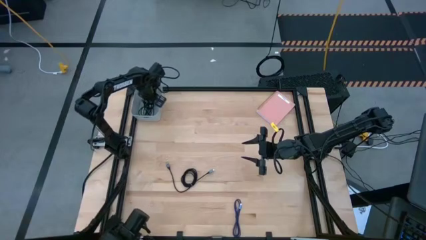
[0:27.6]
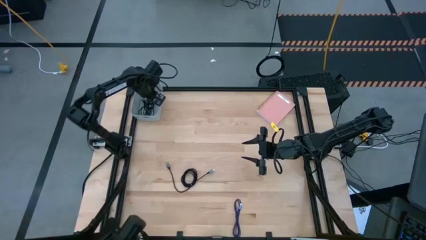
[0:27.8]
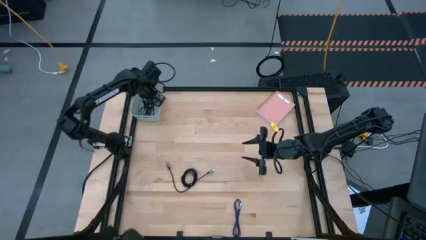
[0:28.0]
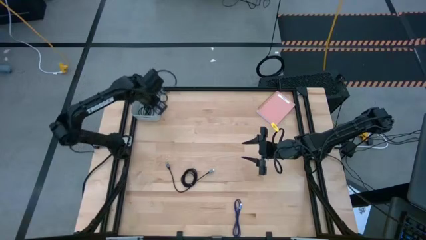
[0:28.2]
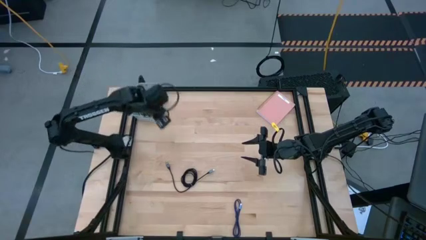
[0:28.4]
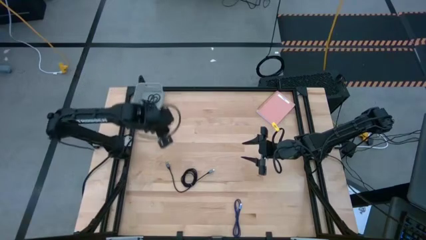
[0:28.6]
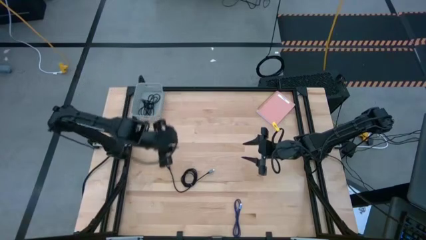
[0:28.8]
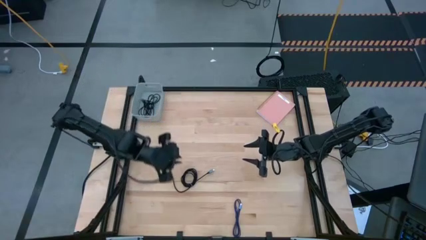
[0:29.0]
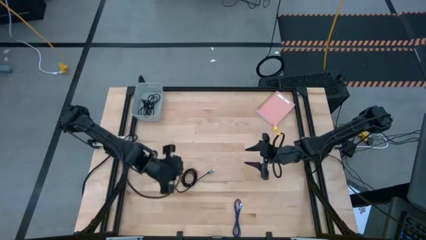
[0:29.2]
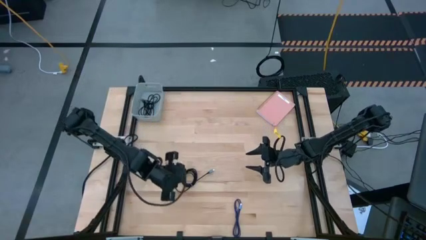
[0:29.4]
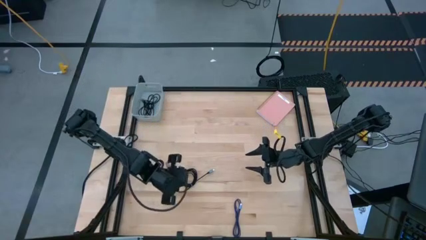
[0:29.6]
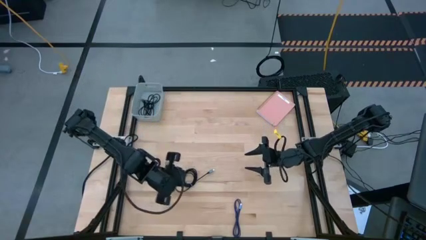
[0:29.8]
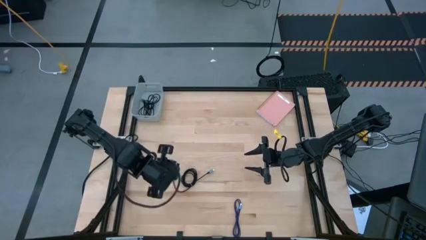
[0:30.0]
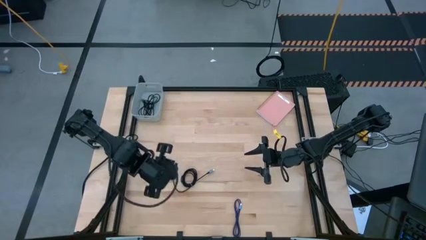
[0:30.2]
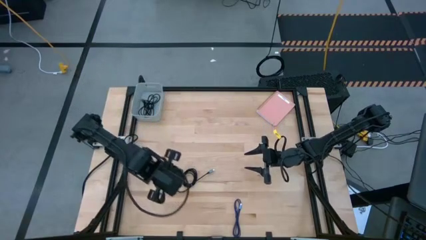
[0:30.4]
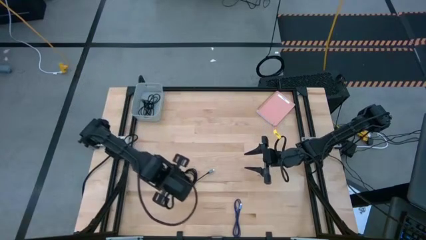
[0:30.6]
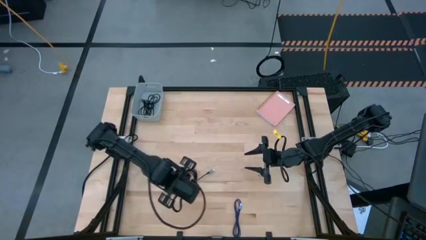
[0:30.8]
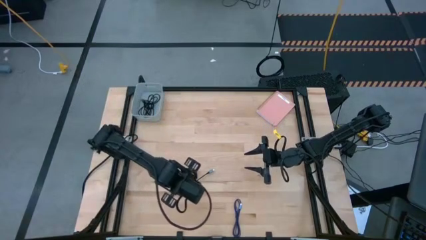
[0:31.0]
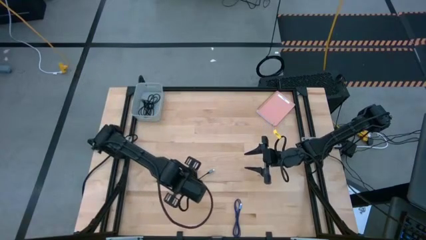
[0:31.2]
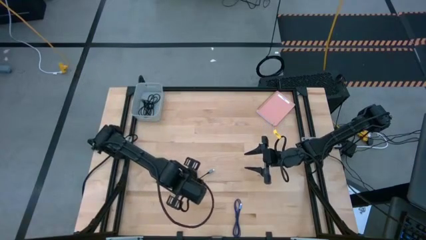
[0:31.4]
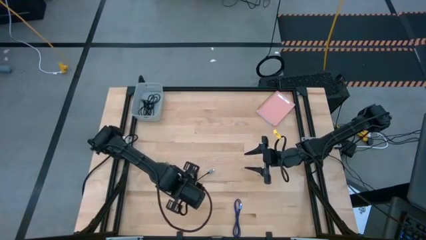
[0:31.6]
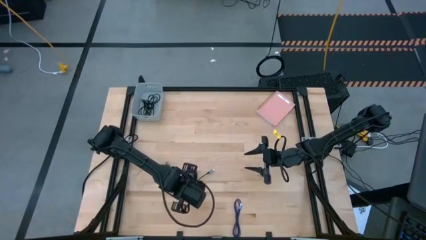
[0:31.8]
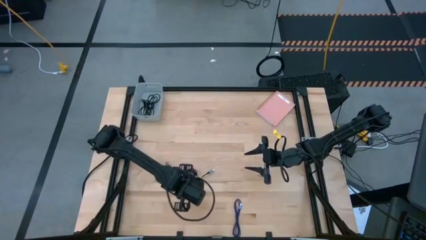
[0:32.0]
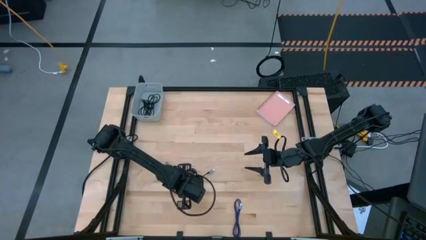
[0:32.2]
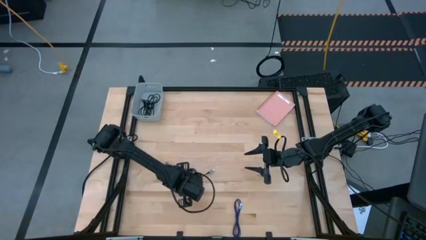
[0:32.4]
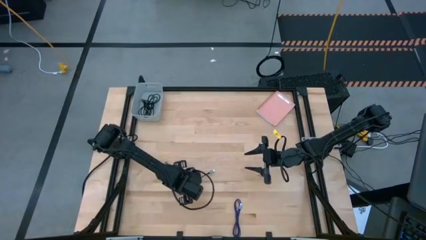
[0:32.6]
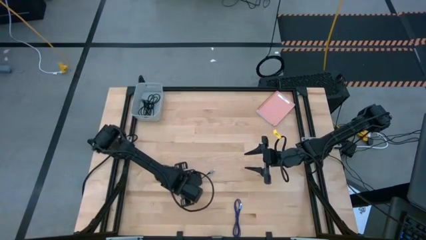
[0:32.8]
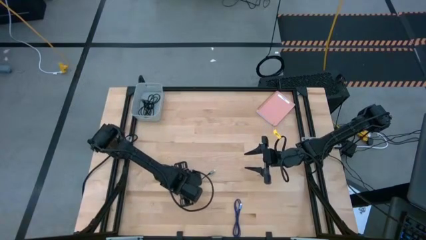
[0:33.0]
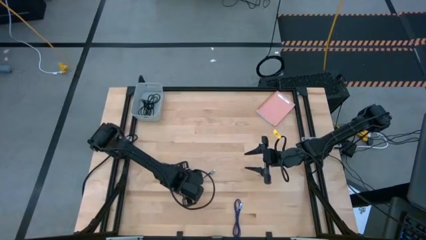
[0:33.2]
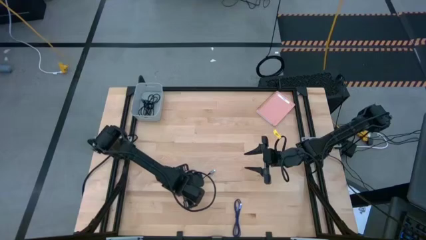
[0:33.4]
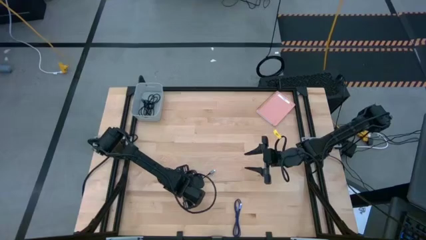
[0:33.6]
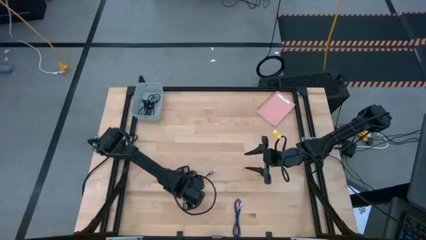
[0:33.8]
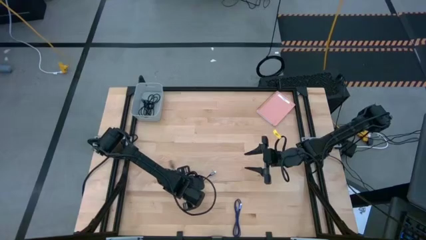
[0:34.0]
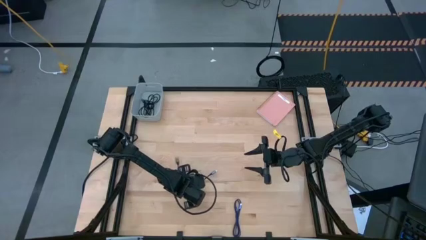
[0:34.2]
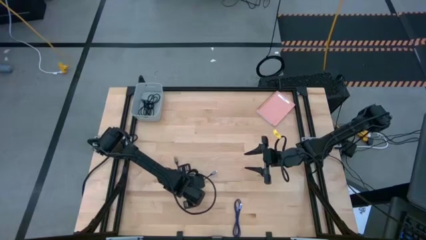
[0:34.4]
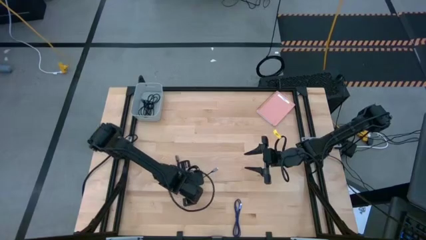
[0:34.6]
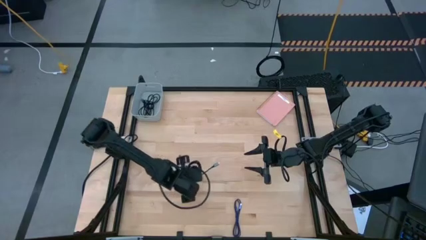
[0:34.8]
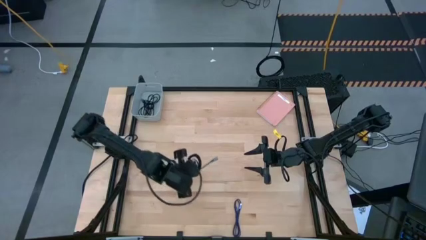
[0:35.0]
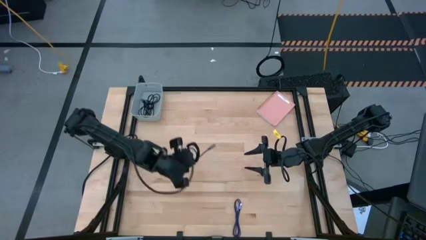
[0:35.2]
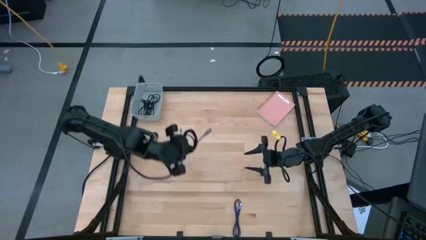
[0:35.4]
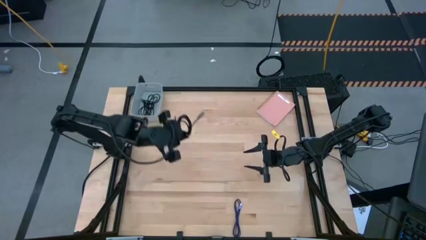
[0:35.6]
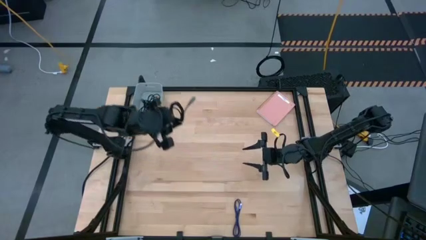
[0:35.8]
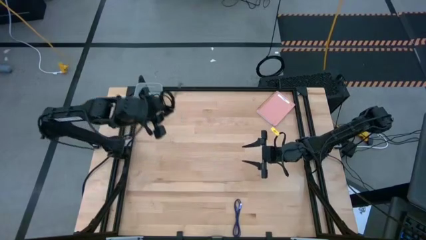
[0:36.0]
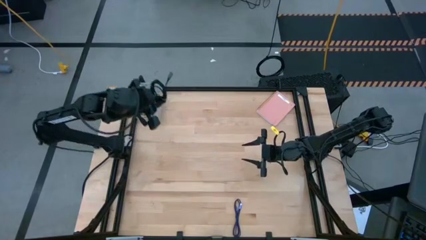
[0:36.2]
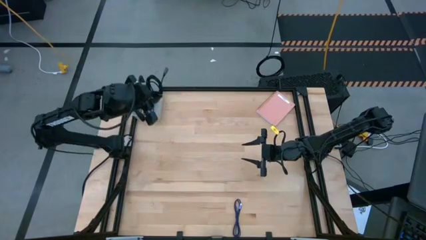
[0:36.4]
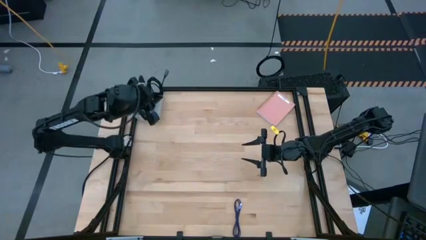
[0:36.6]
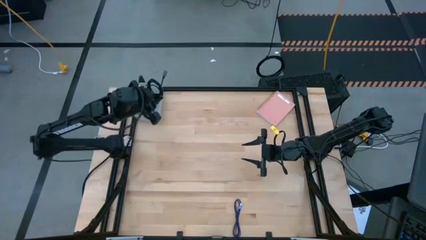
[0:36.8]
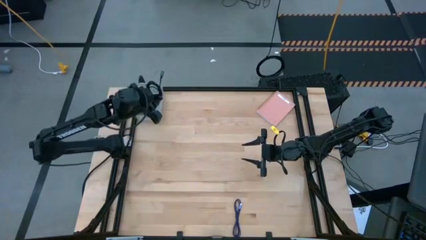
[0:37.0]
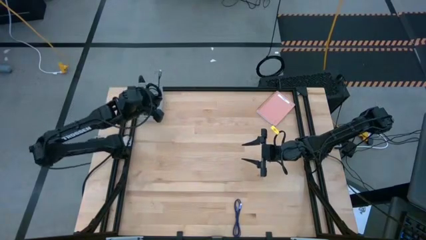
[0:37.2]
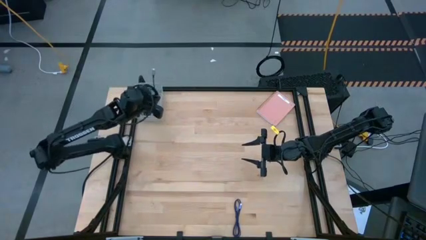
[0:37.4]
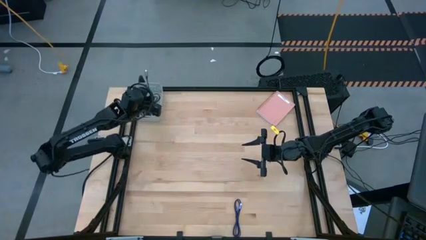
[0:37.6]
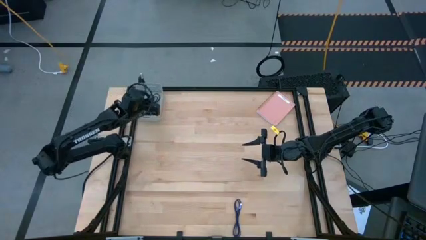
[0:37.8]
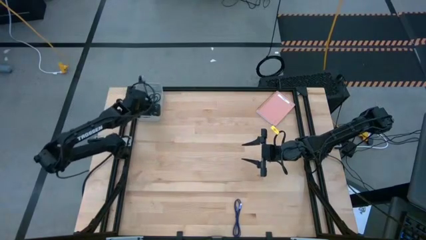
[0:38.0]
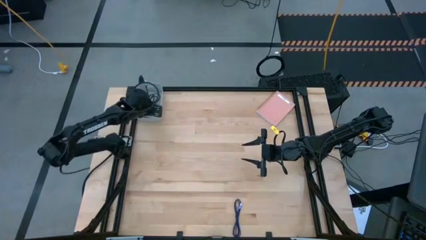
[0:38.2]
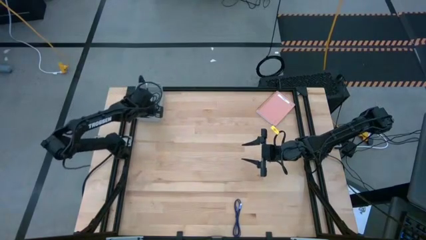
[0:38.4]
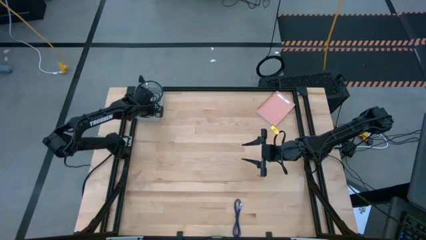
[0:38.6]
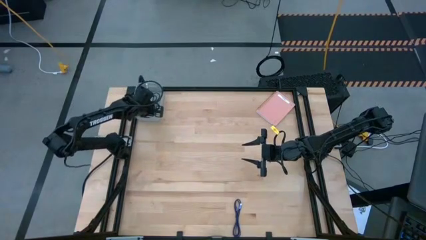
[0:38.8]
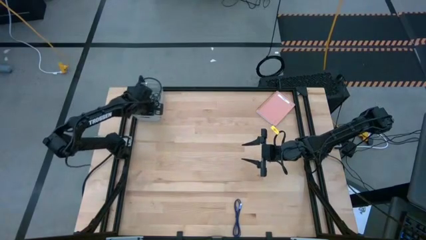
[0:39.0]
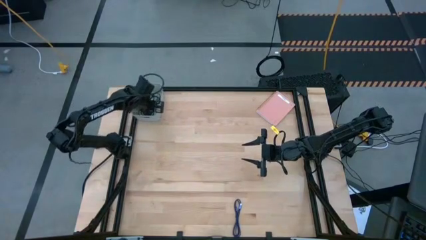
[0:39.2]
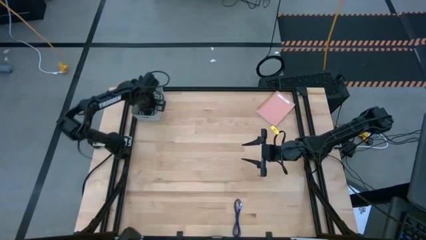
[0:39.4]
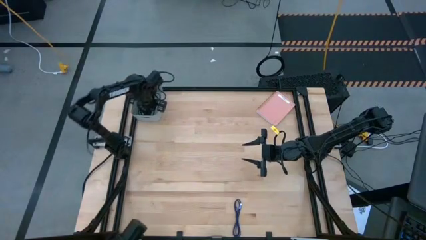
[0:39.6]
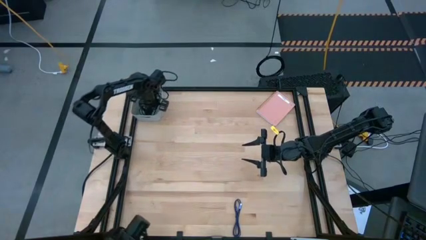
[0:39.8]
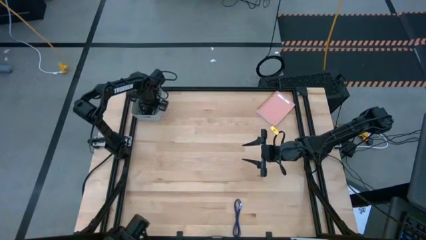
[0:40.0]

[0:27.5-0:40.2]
Task: Pick and place USB-C Cables
Put the black charger cable into the gray bin
